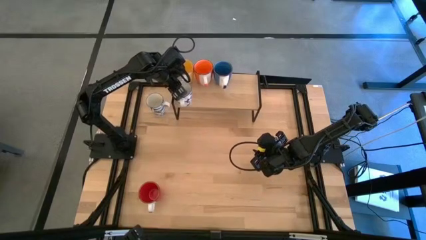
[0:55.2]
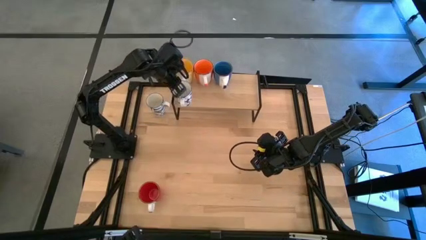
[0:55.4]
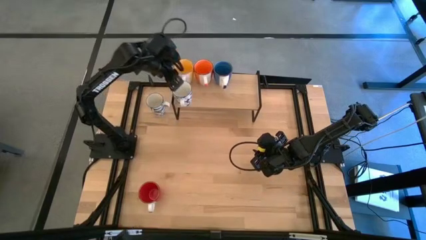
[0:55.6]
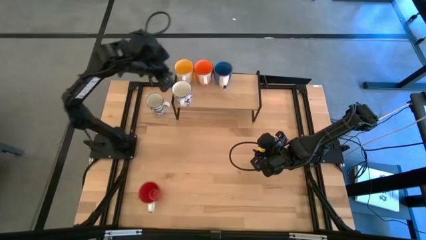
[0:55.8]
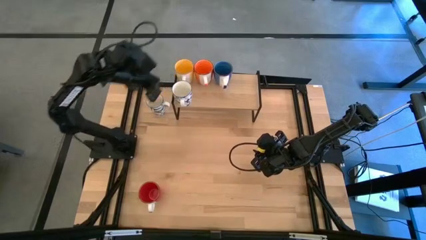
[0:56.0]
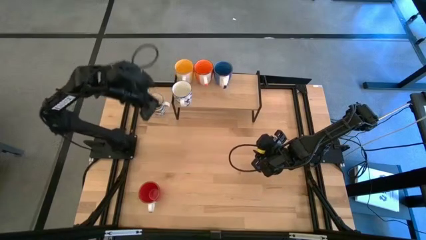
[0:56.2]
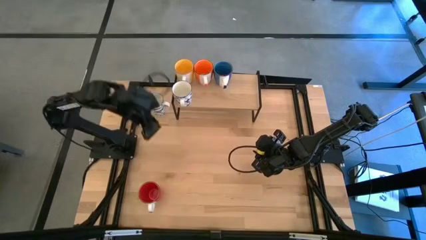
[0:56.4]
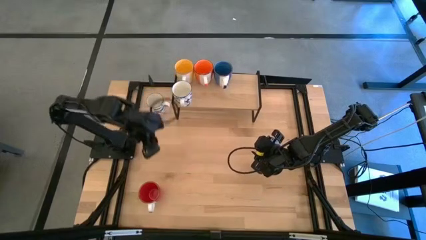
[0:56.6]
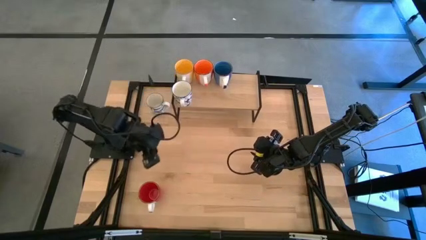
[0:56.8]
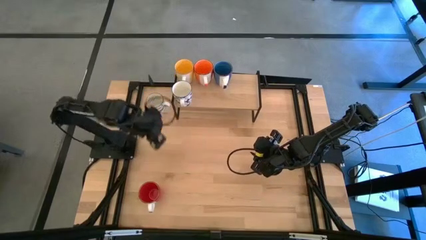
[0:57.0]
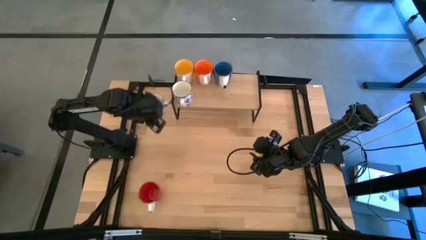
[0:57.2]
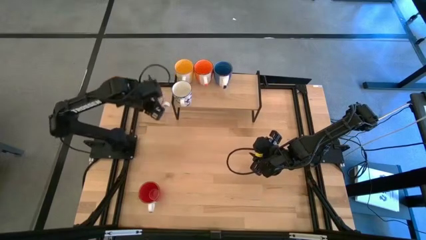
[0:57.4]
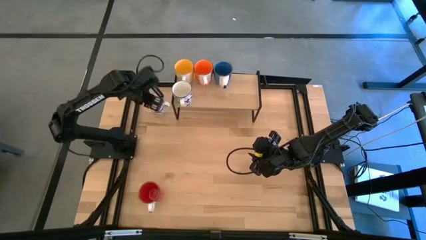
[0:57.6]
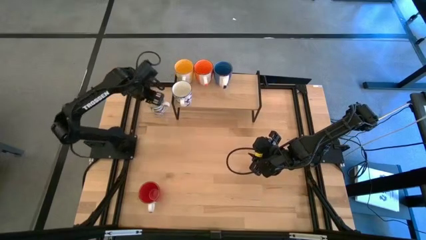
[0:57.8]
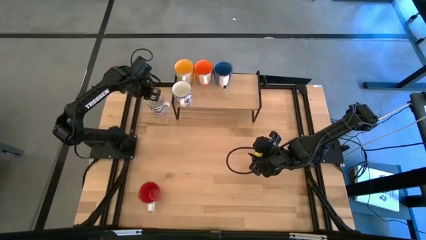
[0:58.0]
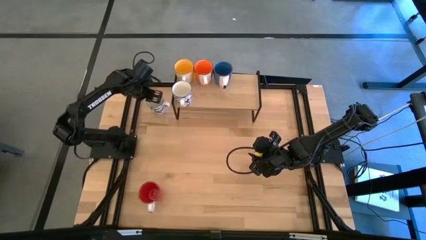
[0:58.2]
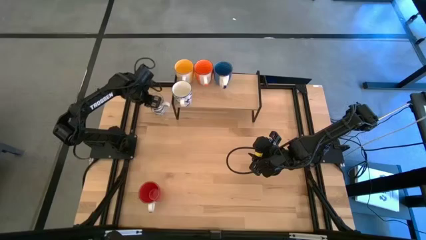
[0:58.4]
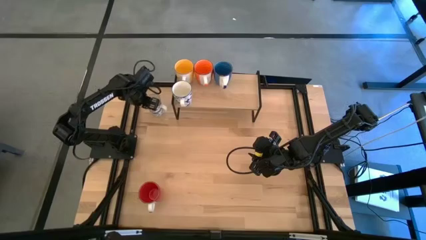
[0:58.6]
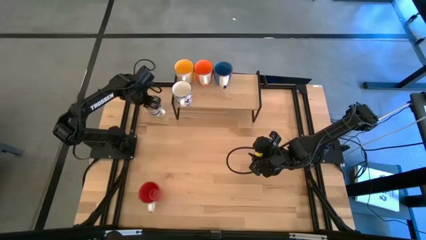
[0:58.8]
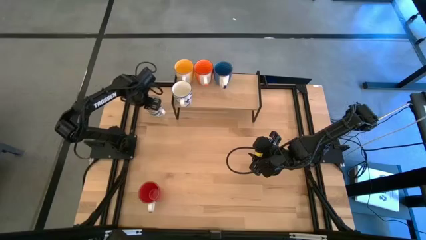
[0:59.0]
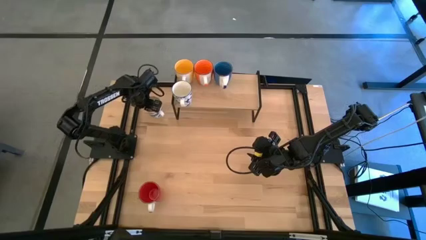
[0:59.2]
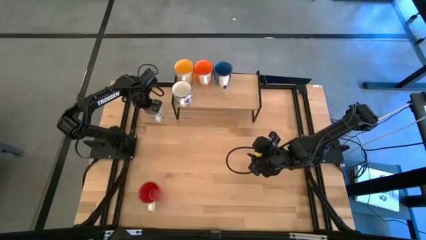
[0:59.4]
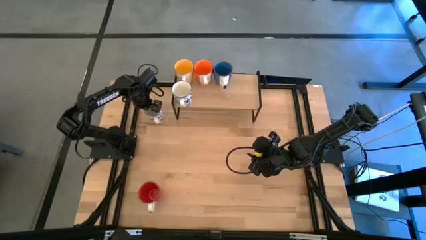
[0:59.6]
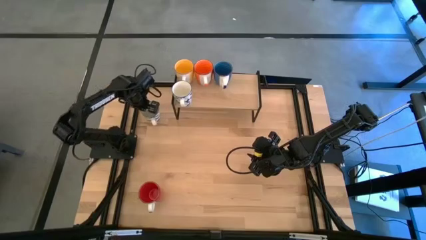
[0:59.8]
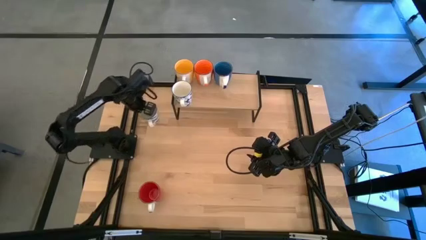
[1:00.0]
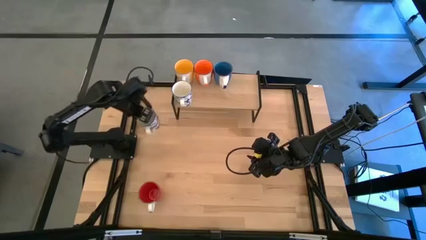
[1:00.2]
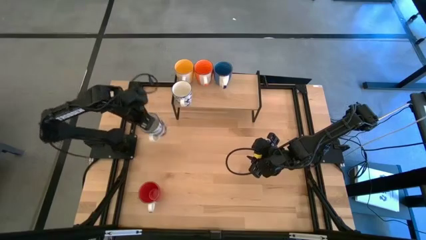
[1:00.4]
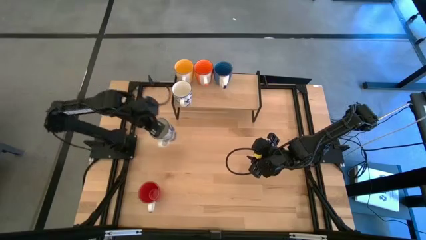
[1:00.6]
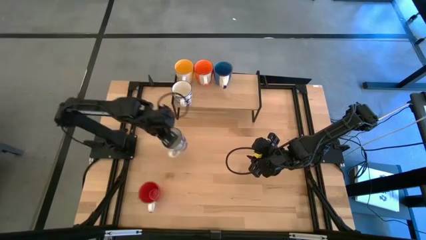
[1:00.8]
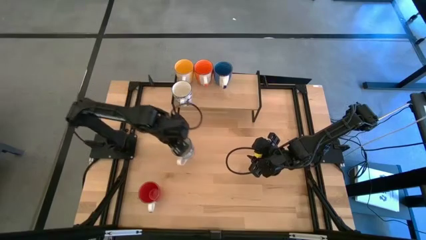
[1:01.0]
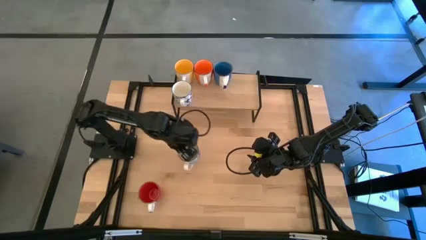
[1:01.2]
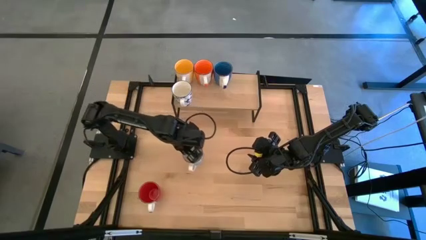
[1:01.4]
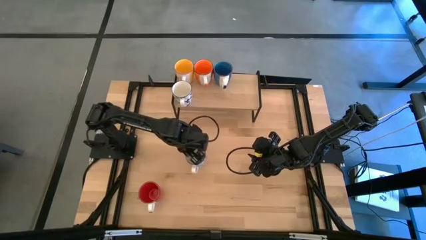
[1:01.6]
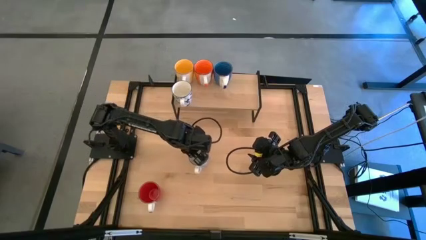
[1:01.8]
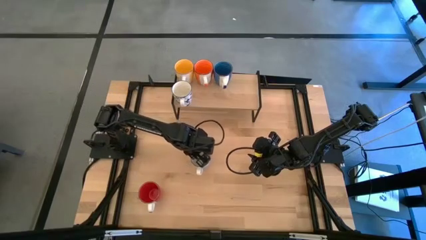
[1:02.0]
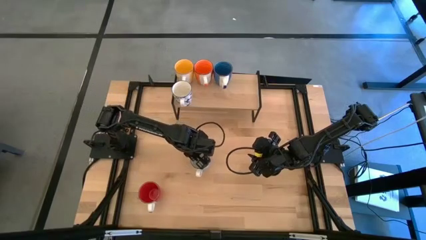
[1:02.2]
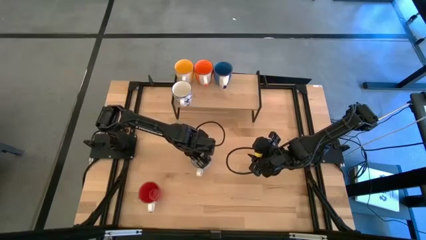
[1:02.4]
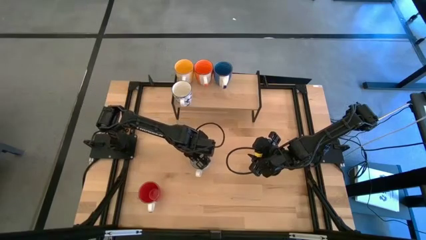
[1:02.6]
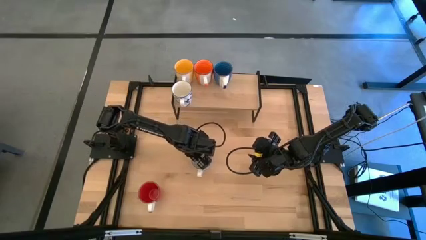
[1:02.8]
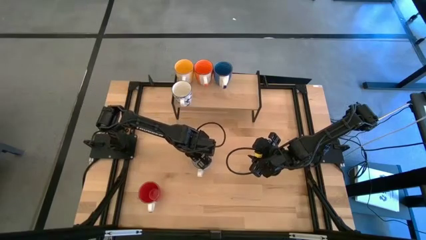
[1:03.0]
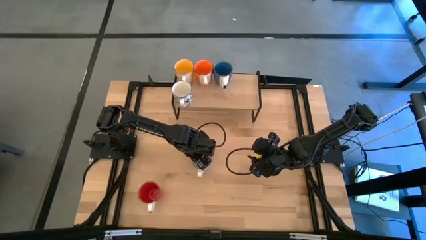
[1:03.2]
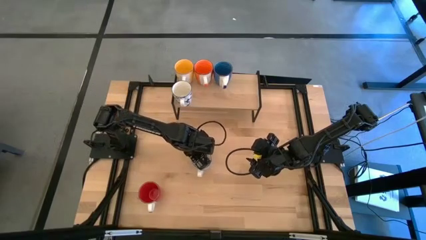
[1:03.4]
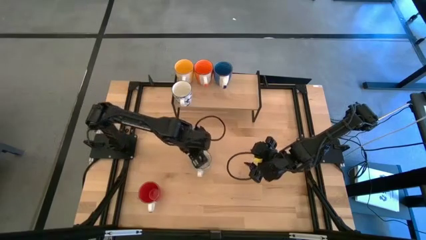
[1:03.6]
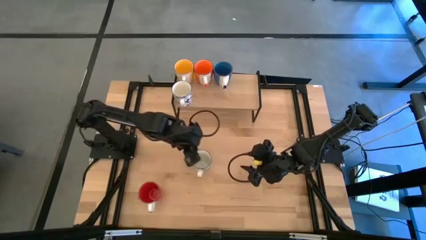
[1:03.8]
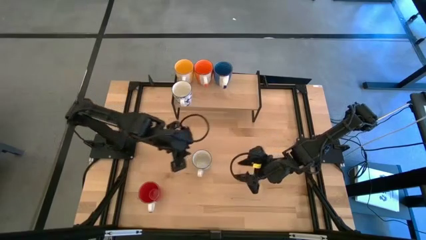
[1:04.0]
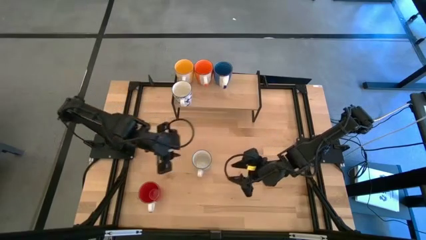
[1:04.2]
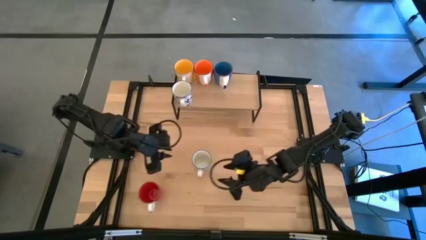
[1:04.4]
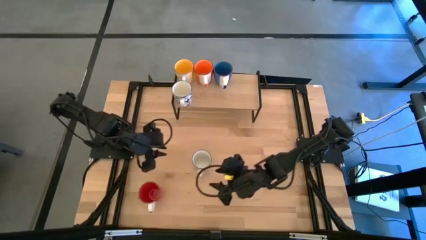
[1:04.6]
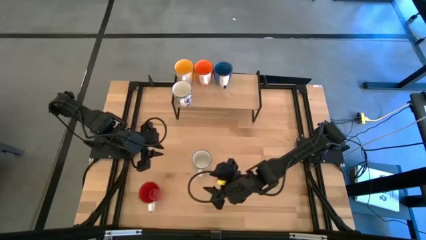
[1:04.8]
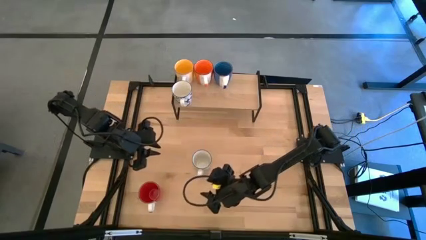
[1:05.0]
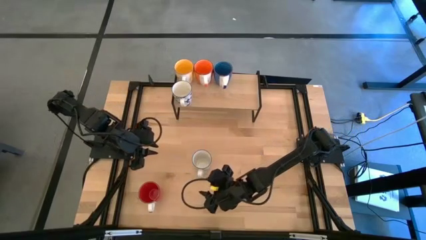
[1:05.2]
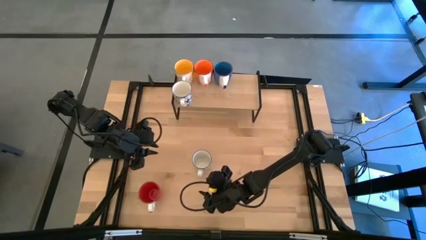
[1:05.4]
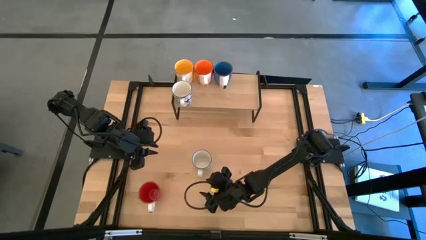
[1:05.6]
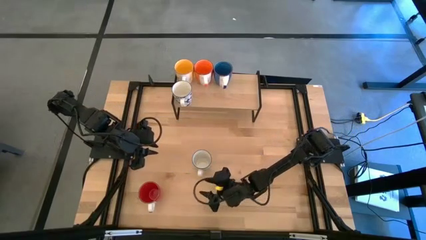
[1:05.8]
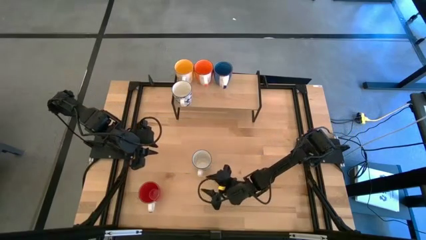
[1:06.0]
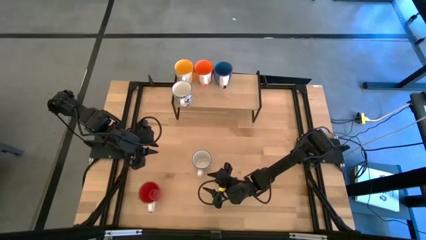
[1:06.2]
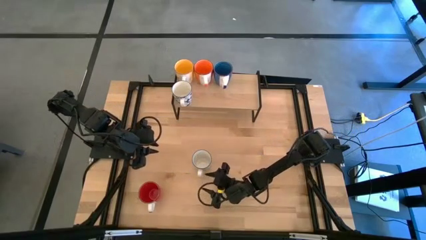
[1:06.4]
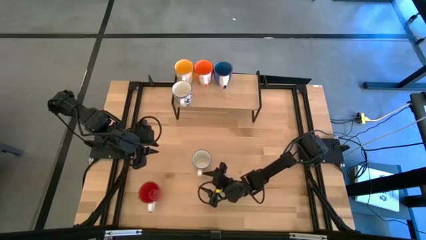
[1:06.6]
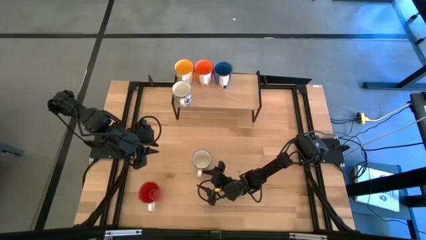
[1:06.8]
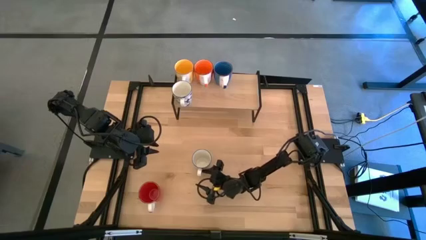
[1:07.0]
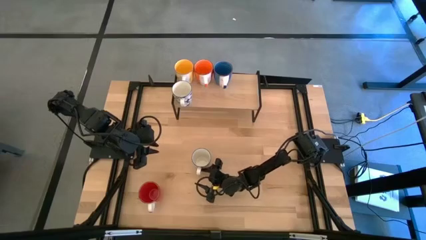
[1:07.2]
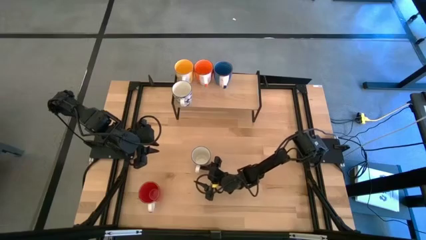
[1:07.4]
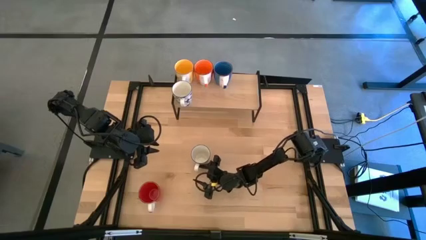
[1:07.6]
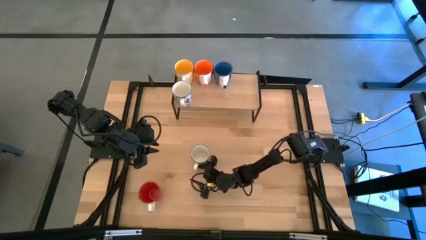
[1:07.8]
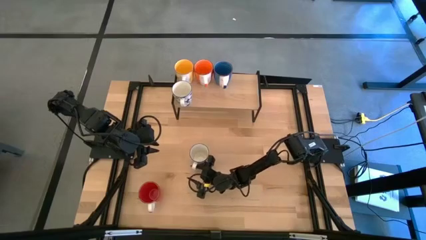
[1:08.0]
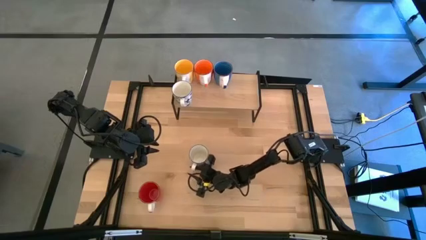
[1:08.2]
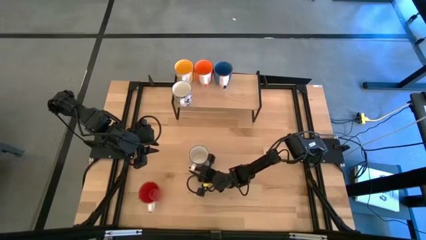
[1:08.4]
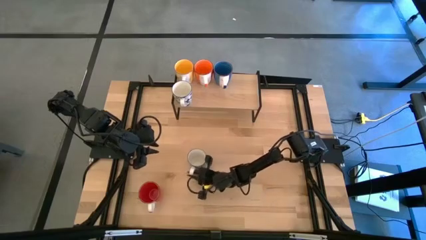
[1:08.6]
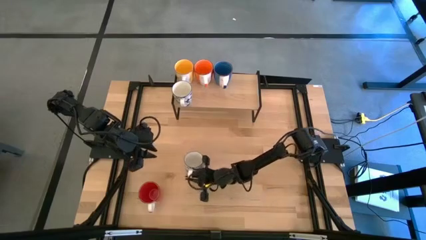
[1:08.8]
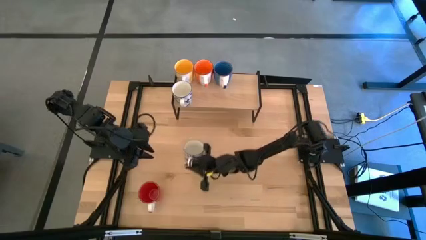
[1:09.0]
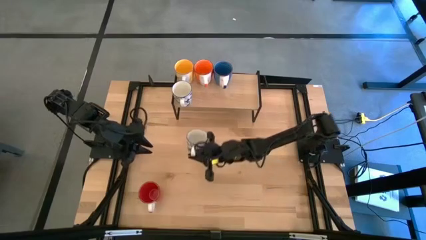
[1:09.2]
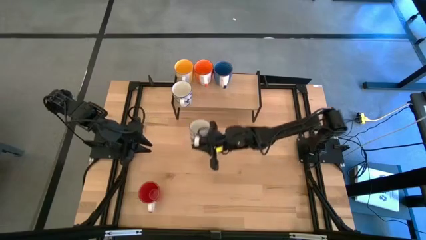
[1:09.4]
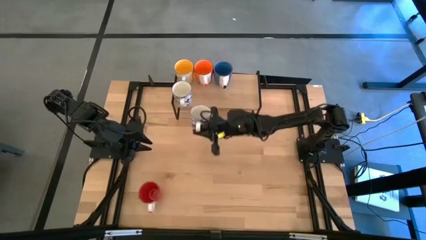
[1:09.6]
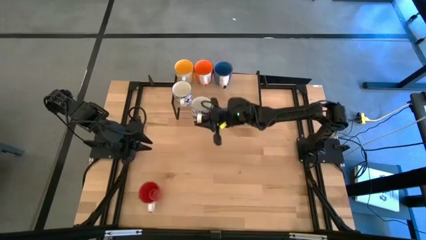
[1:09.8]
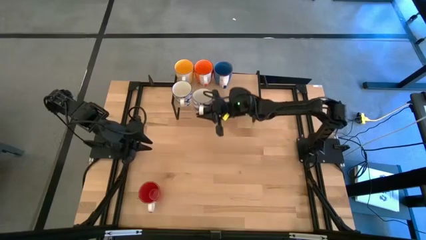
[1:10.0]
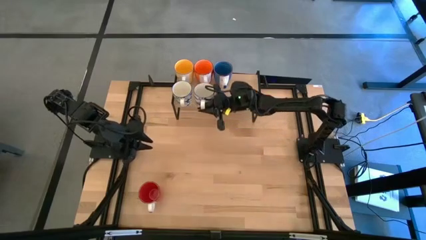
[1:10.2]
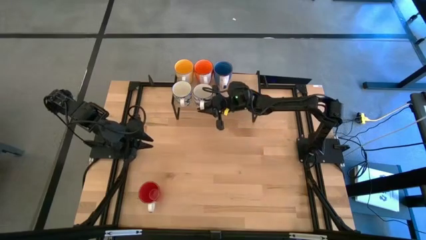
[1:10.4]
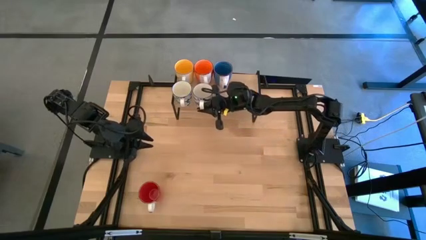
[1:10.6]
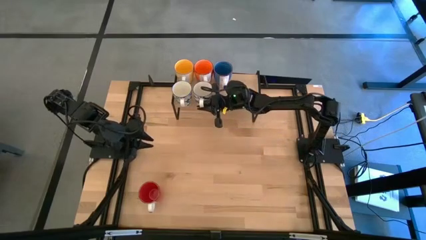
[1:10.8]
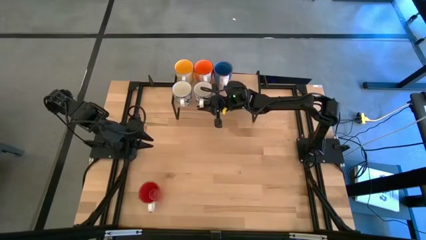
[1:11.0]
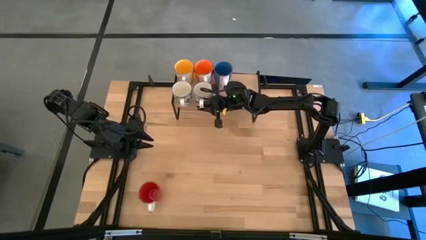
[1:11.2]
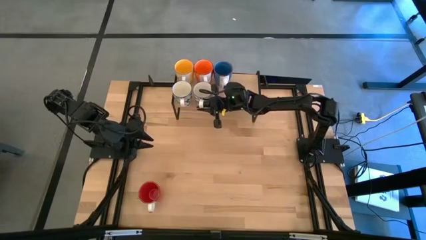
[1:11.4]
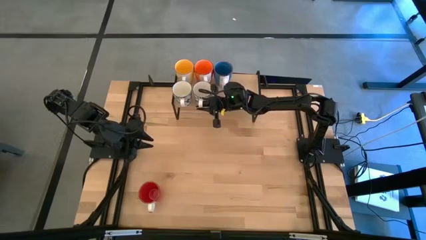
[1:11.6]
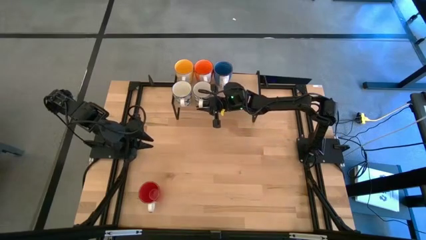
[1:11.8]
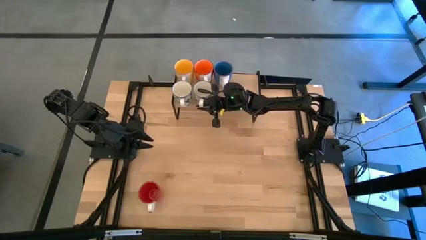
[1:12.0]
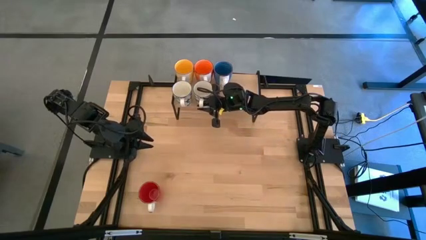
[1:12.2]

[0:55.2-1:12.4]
Task: Place coffee mugs
Put the blue patterned mug on the shelf
